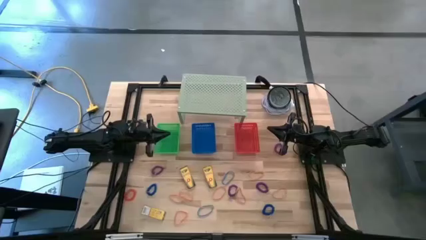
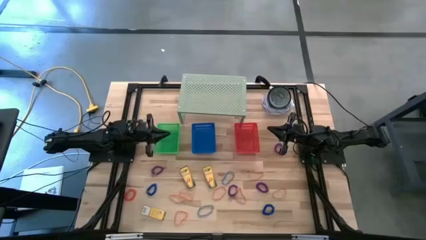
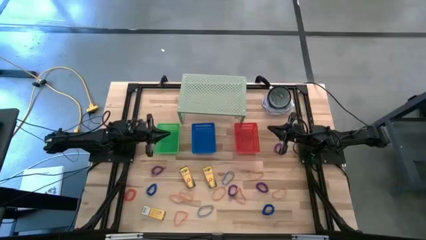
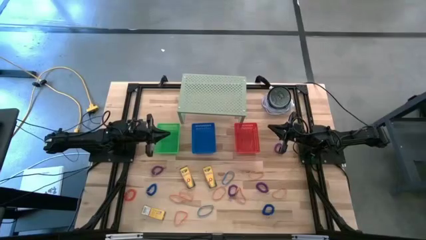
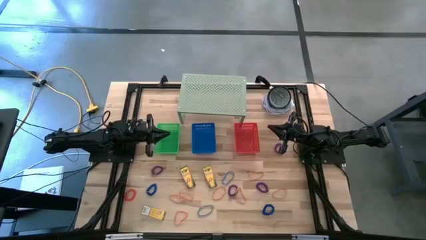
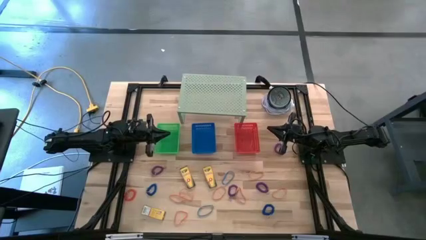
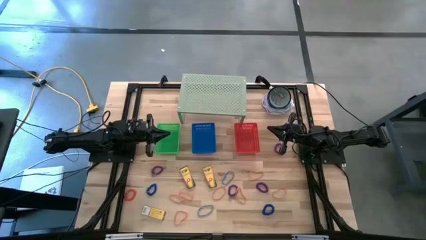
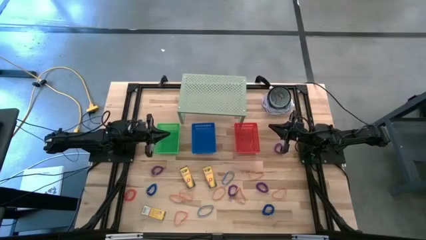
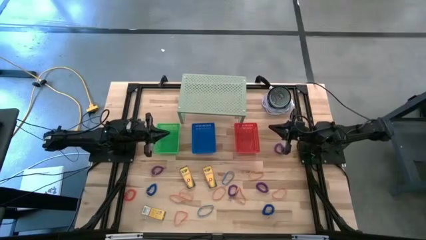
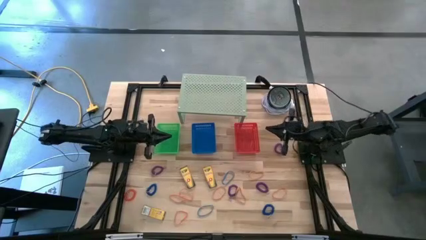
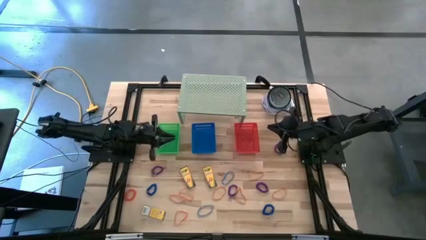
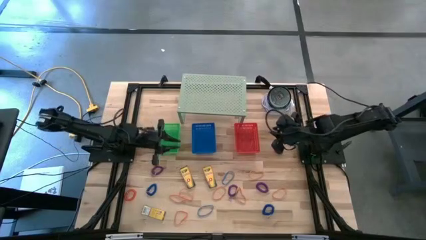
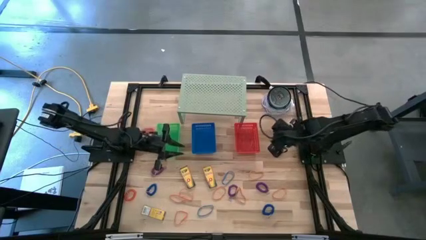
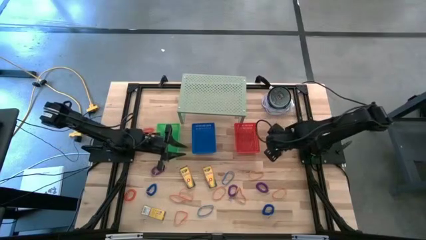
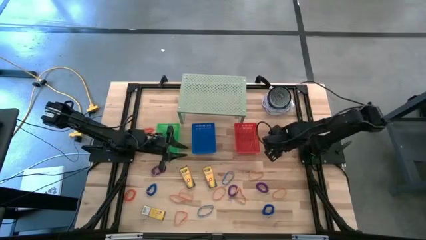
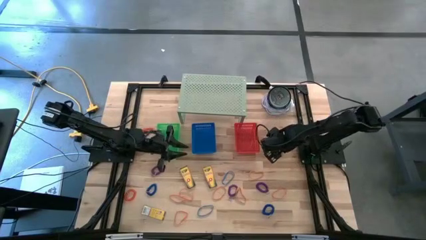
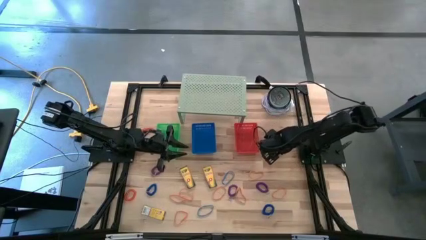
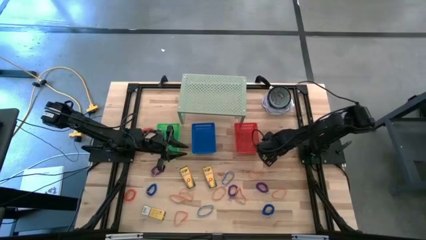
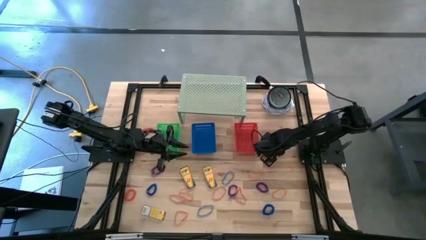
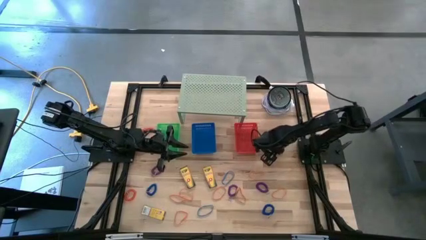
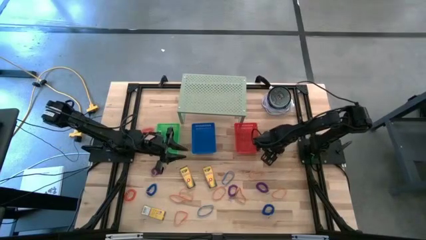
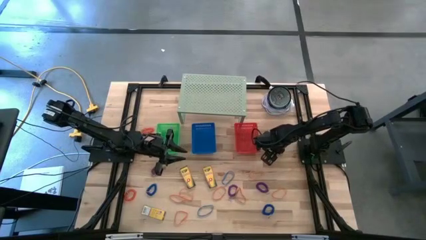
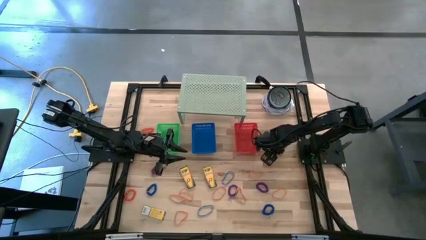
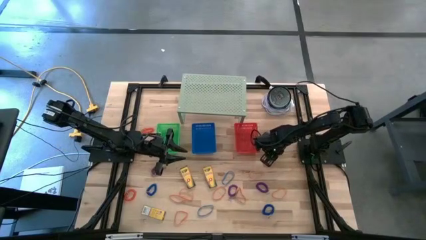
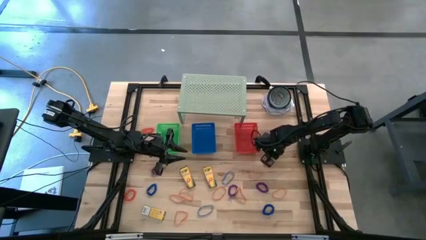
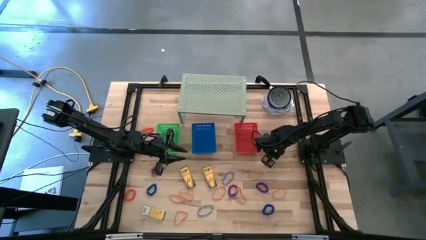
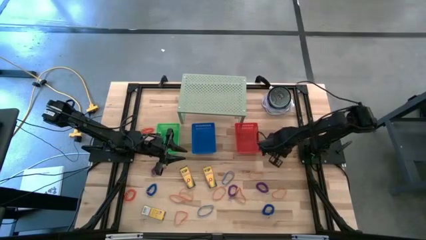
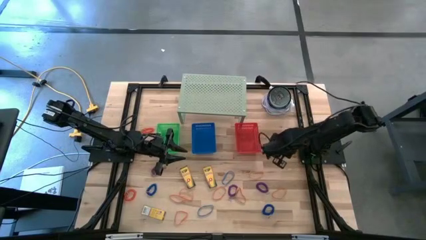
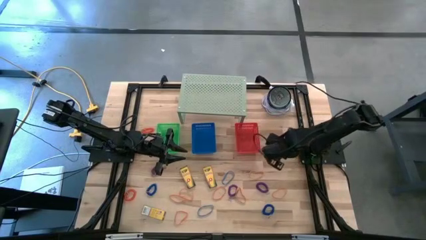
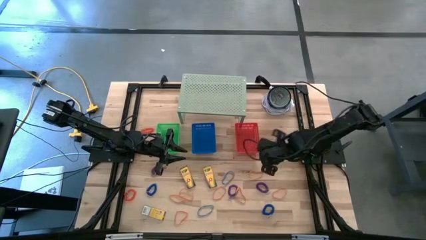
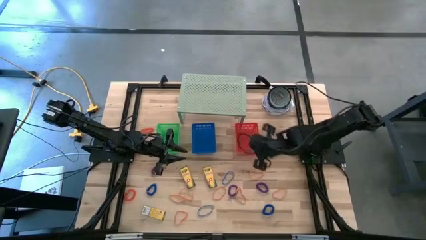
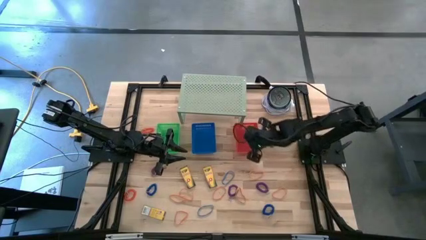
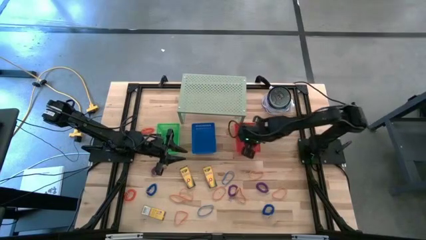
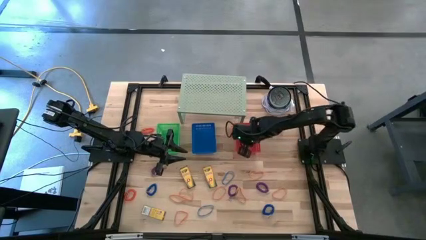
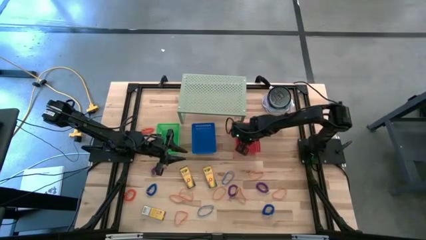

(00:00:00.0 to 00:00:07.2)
Task: Pick & Place Office Desk Supplies
Put the purple spring keychain into the red bin
